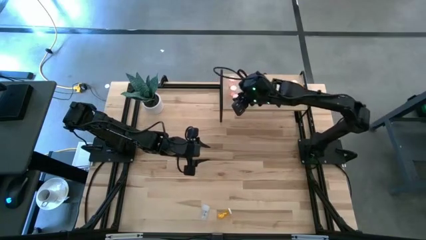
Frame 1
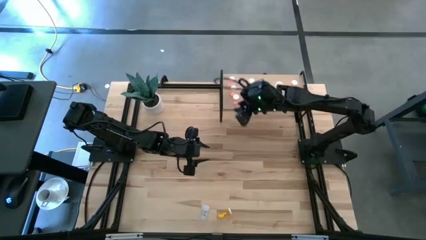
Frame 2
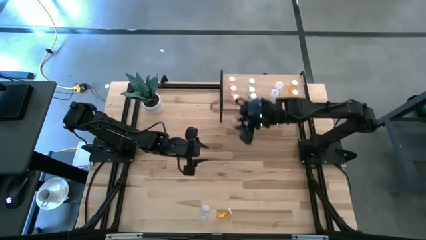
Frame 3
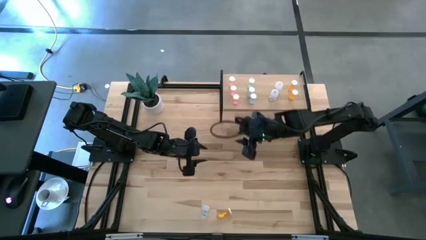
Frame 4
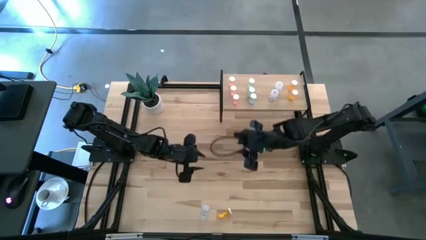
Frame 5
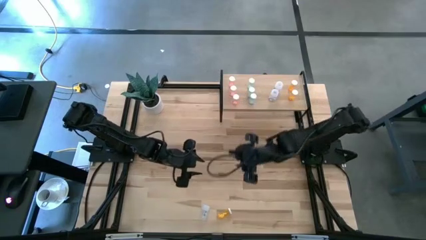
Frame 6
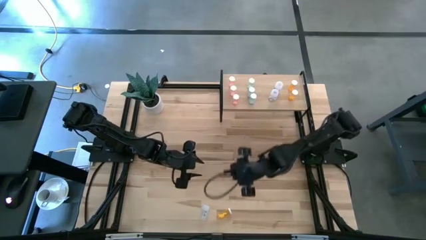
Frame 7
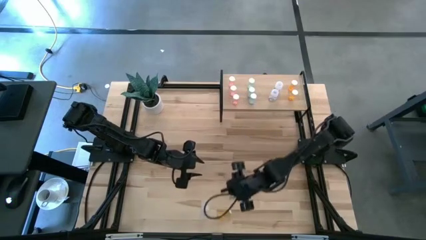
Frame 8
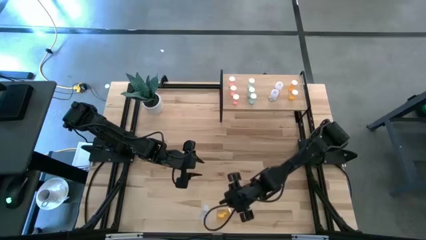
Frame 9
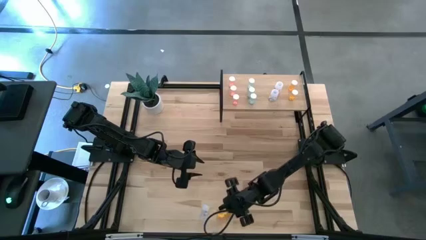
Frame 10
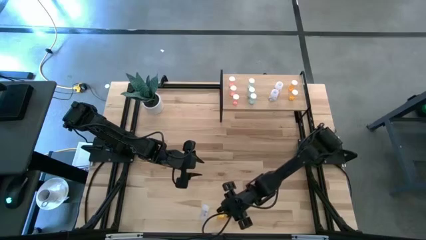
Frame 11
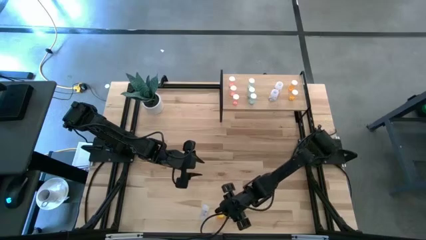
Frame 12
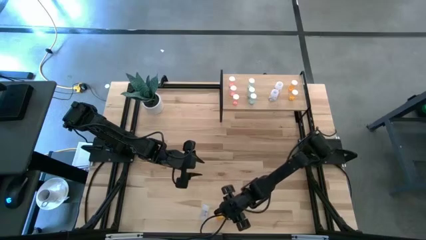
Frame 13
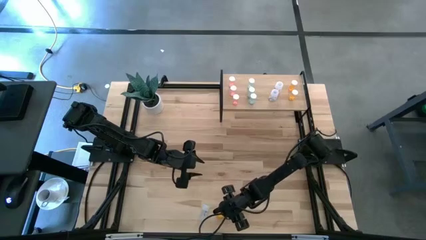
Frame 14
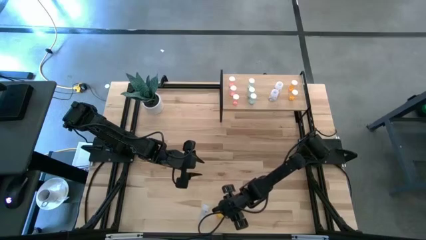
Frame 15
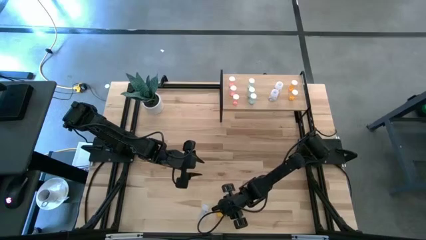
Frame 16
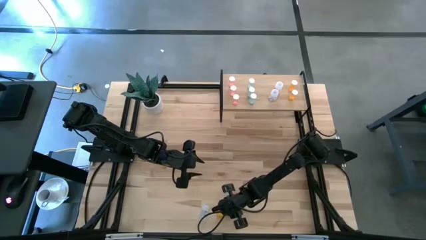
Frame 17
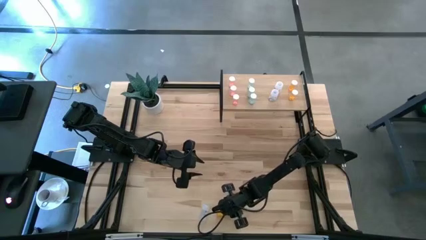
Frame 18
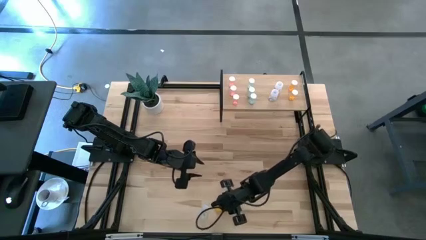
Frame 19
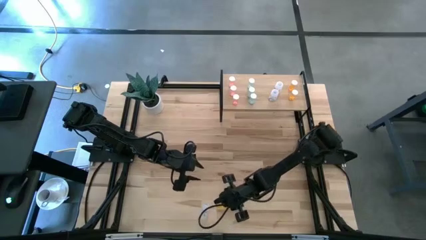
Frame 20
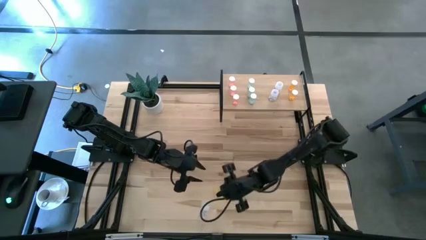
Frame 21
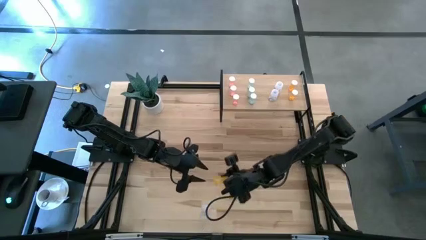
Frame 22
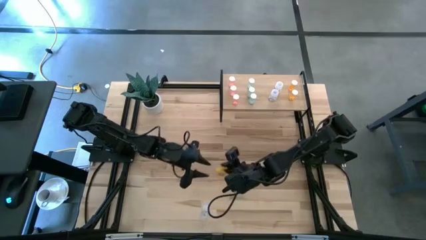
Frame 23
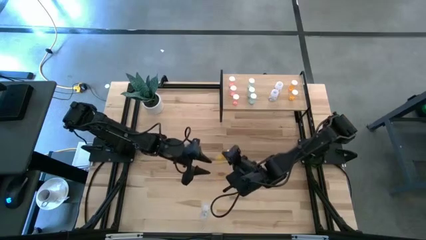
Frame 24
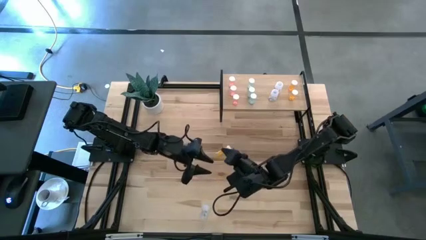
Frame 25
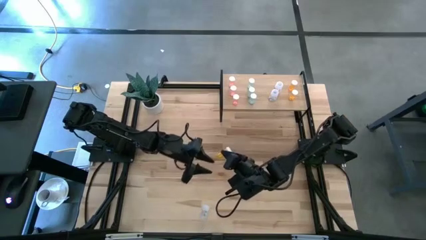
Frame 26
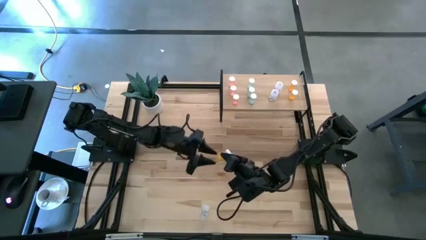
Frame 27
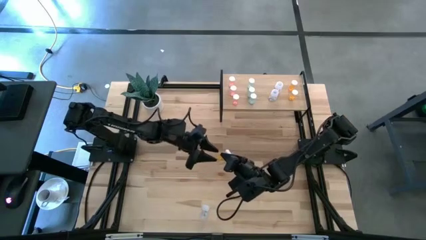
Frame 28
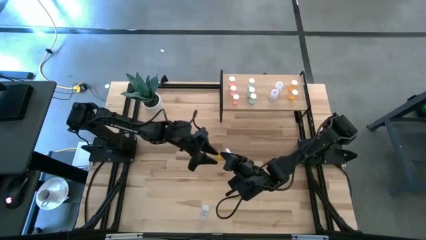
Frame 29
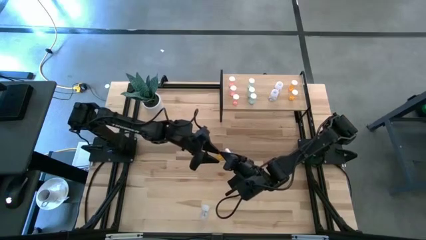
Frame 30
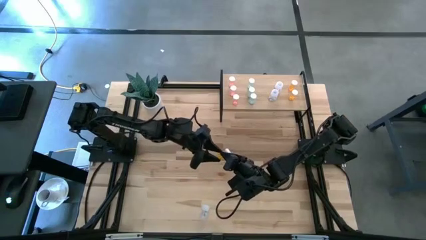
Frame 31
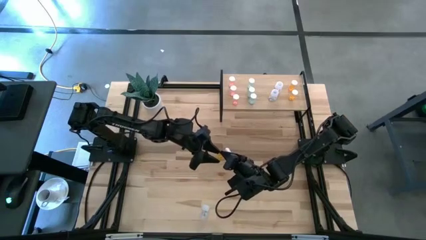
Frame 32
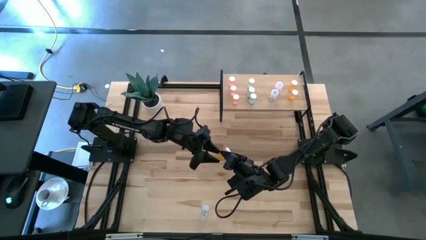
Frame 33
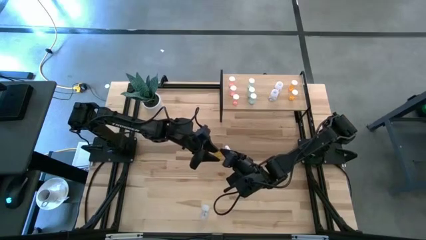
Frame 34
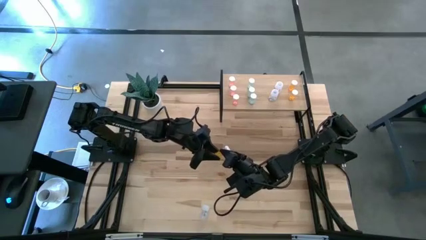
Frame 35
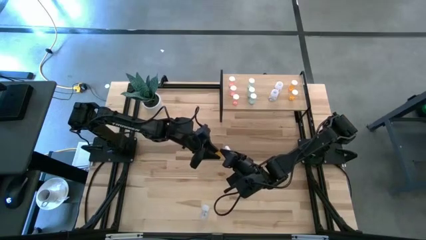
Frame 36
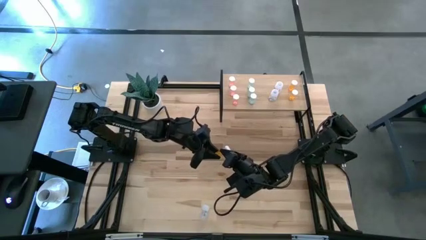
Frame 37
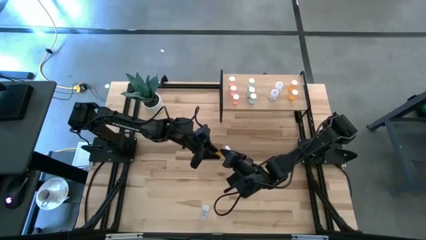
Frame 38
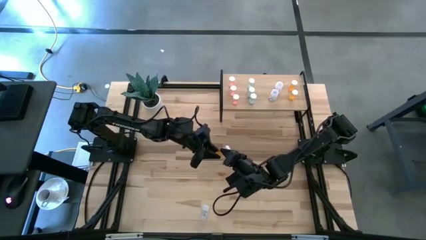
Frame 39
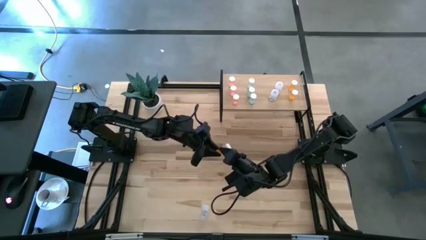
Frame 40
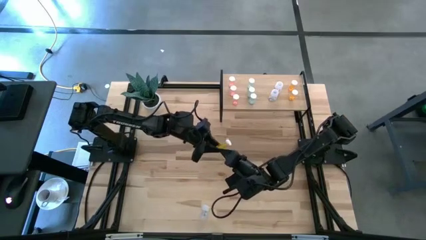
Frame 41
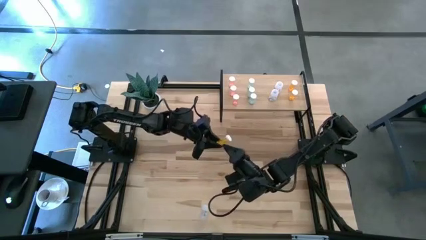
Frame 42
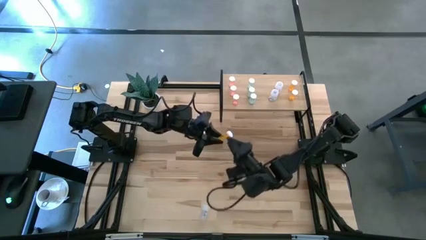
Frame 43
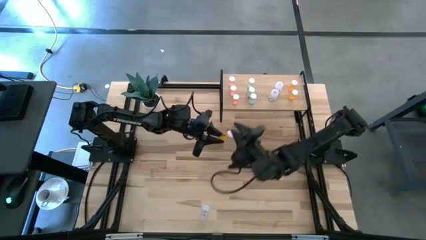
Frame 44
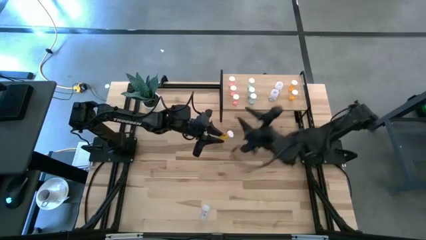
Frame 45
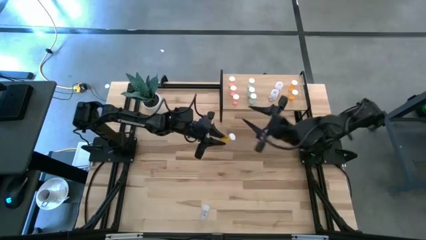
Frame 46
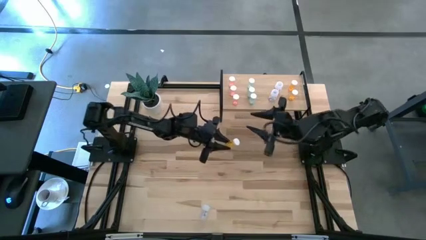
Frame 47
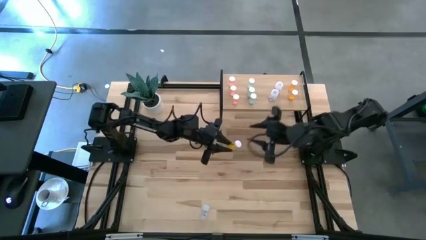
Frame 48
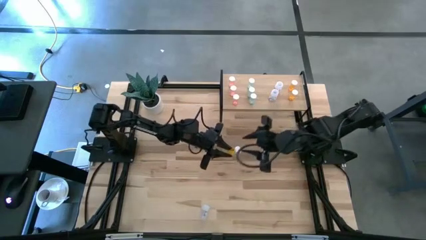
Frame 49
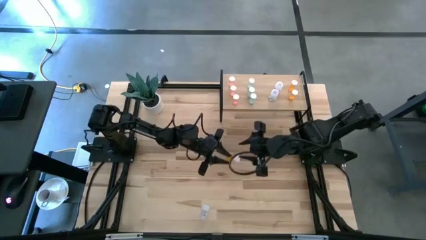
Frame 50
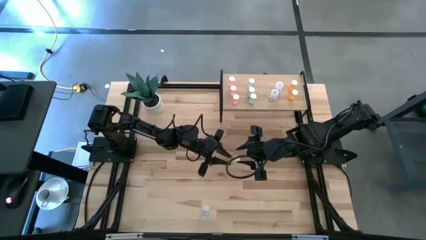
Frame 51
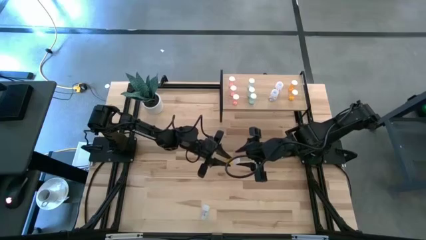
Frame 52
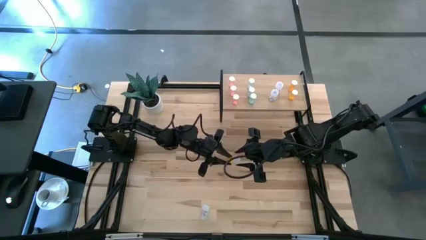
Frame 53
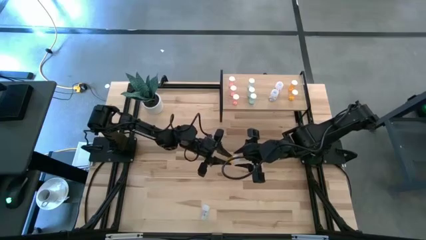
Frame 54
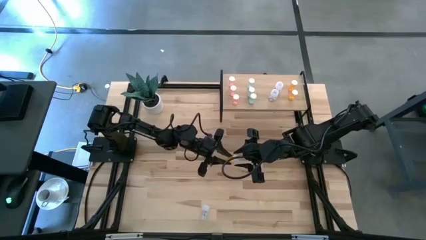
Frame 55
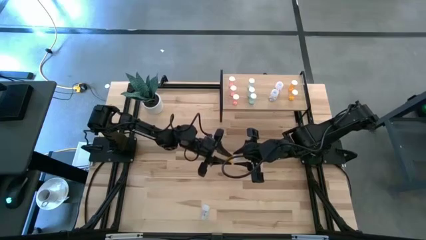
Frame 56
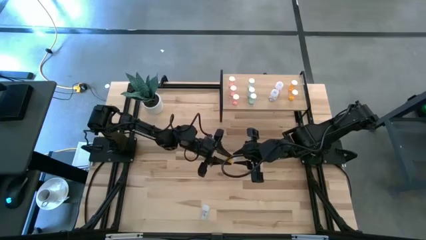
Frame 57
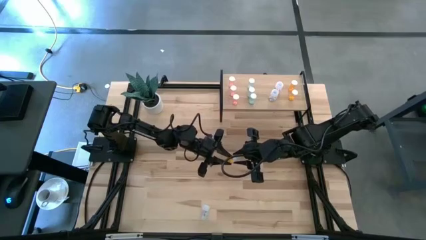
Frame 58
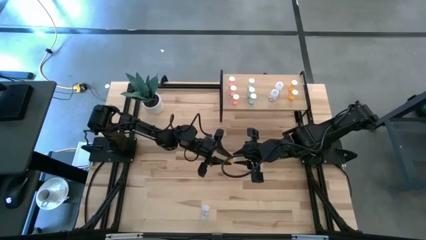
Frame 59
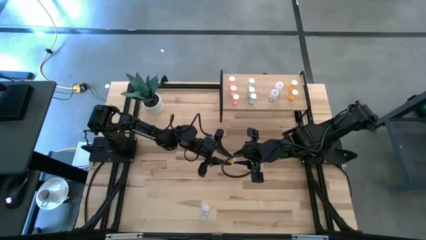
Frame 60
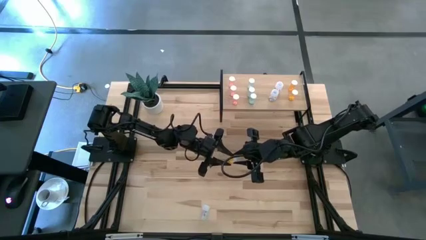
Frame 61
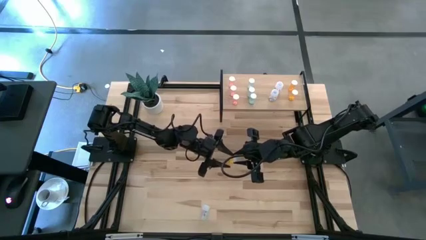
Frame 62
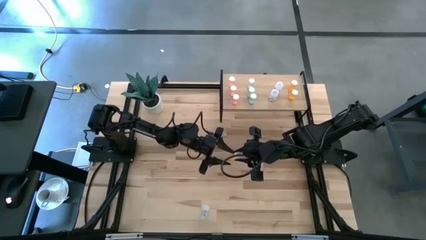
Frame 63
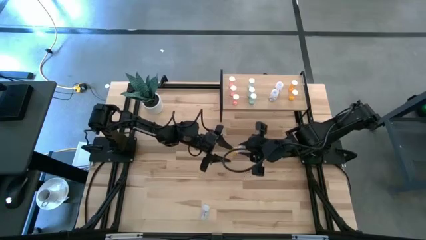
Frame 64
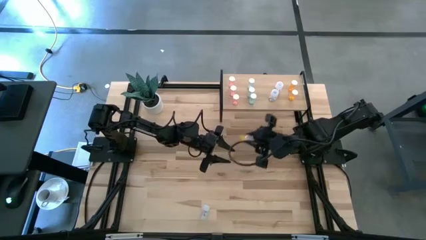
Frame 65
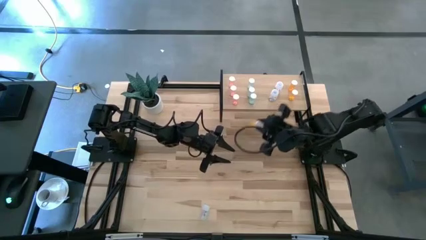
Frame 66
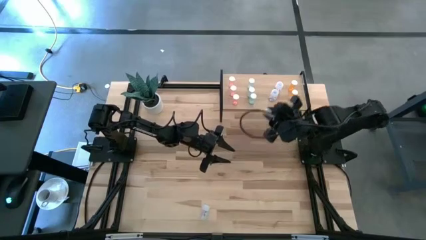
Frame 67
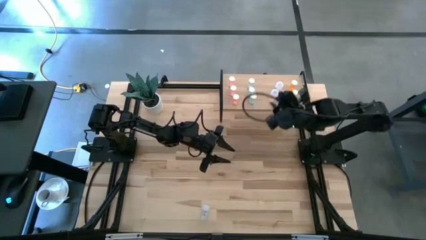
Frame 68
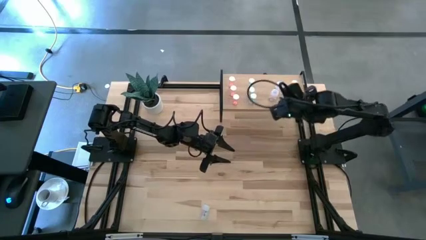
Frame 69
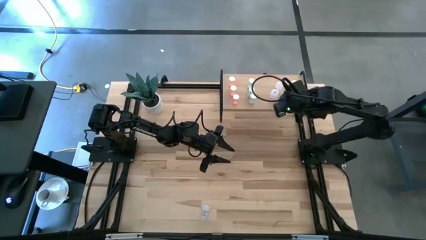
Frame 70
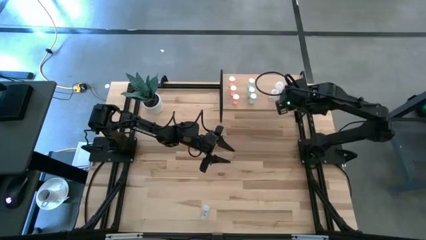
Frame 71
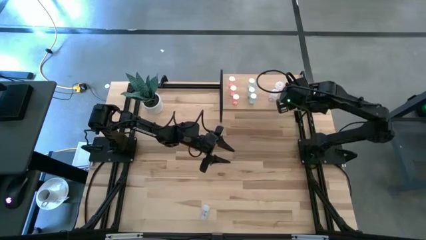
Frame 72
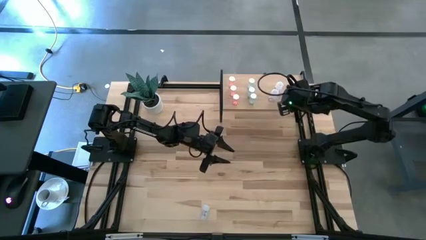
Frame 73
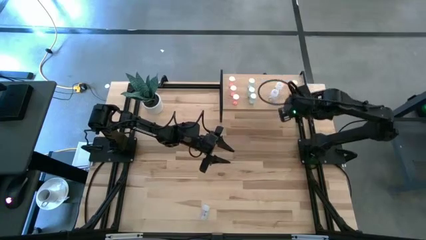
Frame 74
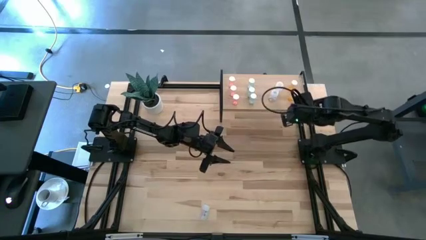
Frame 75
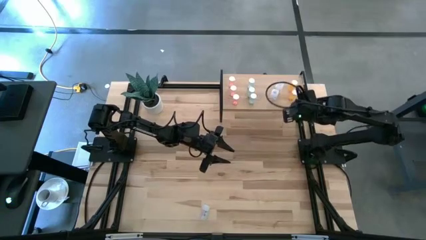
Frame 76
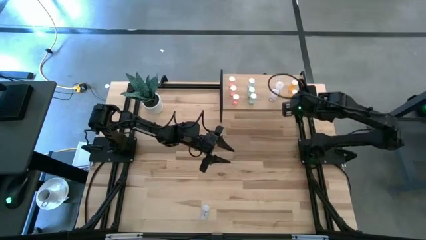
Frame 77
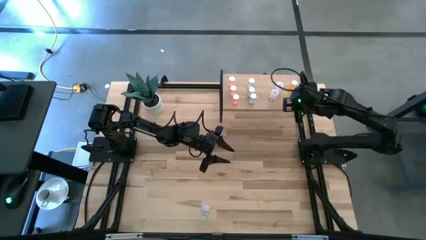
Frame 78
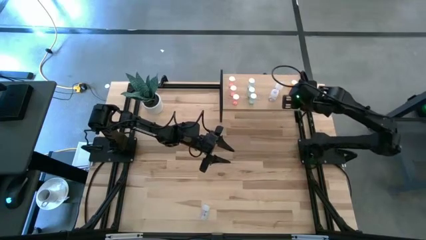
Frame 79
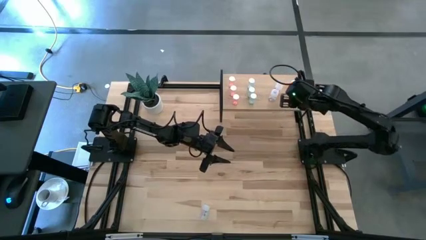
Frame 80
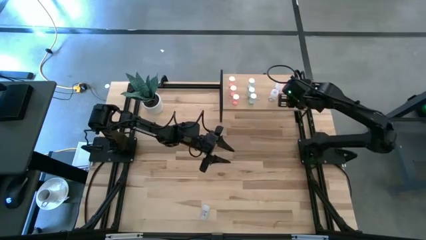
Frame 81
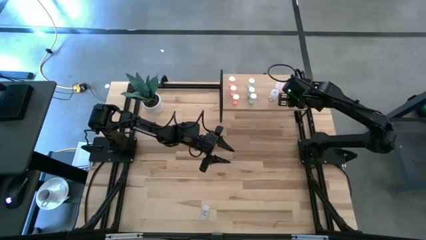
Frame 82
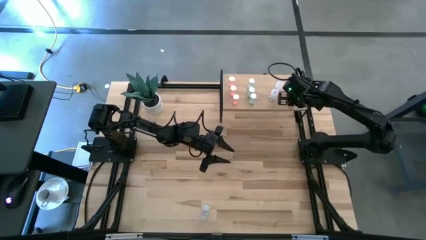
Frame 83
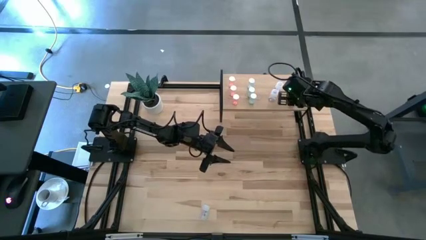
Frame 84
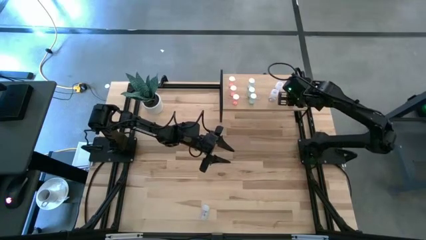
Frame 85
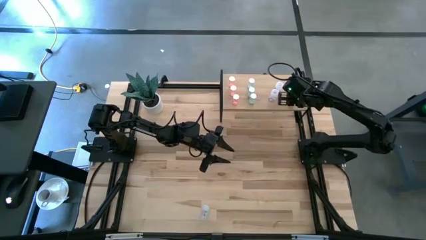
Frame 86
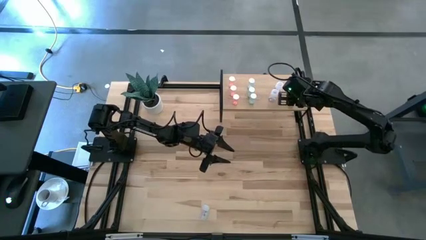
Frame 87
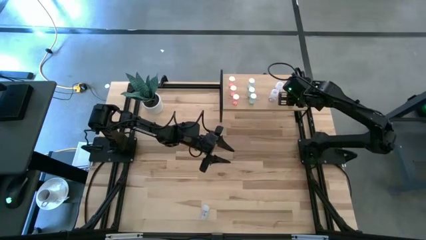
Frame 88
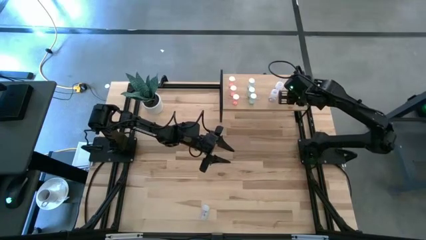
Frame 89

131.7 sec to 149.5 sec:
Task: Pick and place medicine bottles onto shelf by color
Put the orange pill bottle on the shelf aligned with the other orange pill bottles
